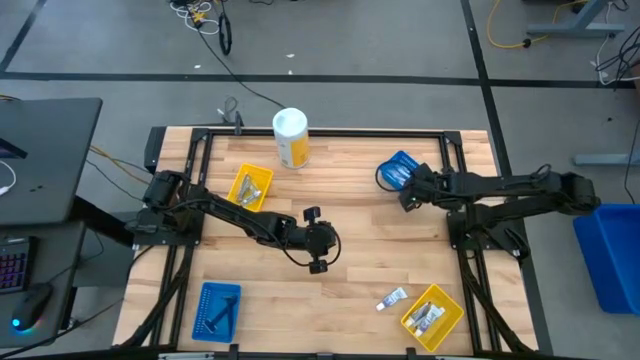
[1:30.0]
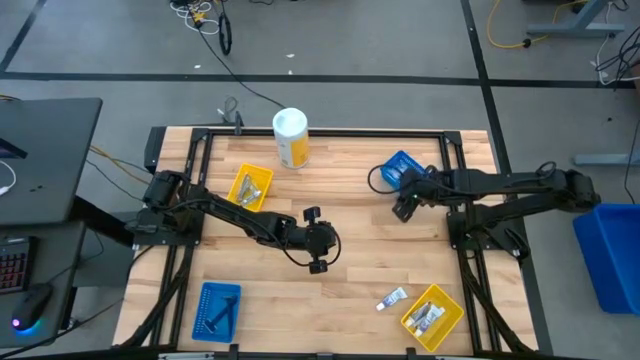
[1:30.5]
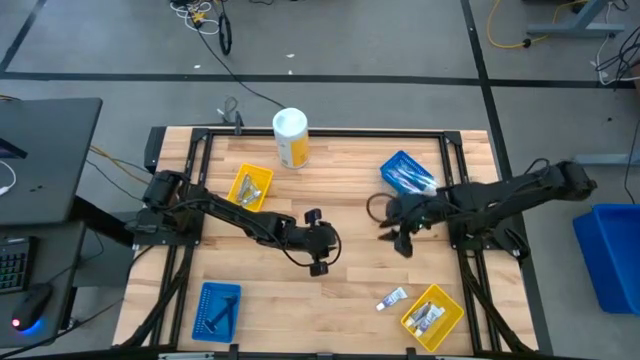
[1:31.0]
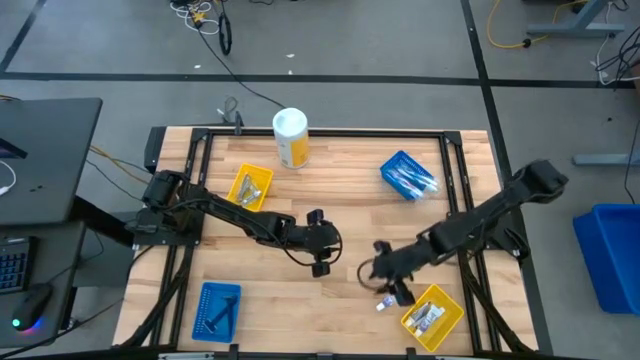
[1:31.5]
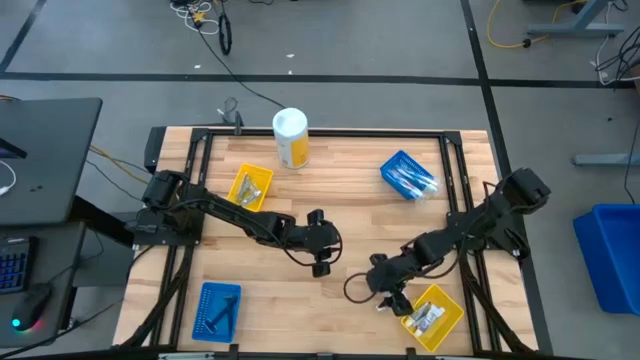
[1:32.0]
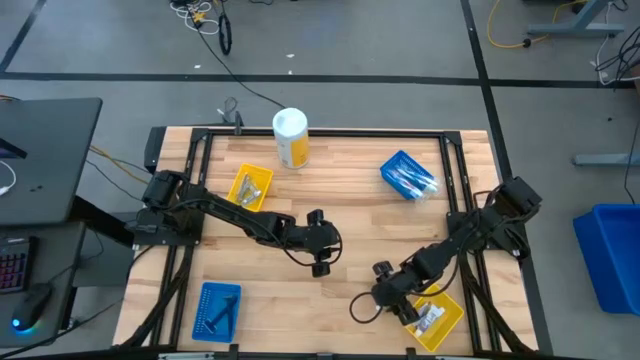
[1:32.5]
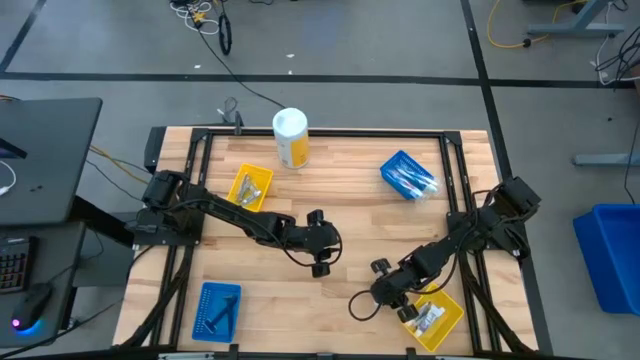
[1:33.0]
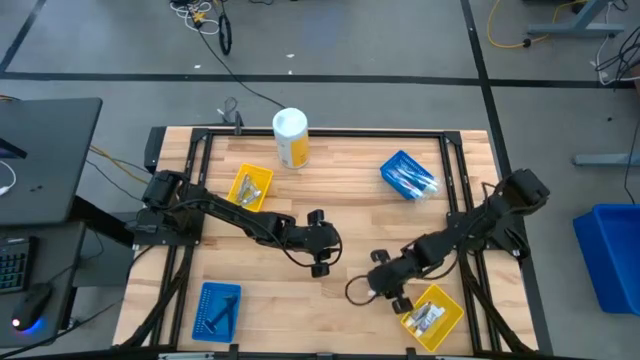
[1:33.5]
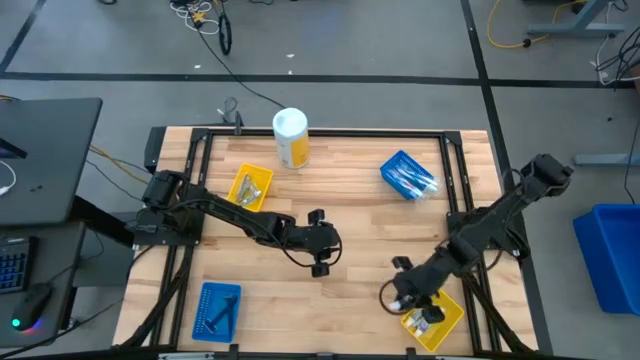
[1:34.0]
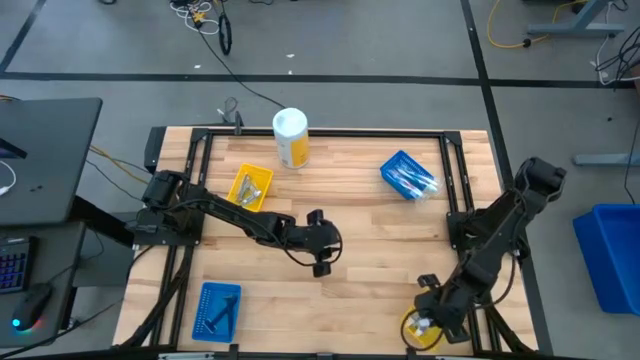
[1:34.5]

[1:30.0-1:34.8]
Task: Pick & Place Travel size toiletries
Put the white toothpaste into the bottom yellow bin

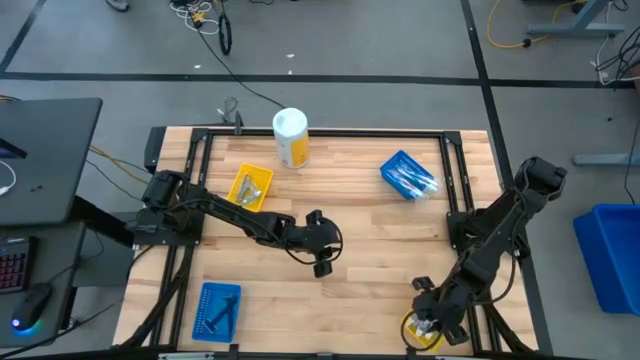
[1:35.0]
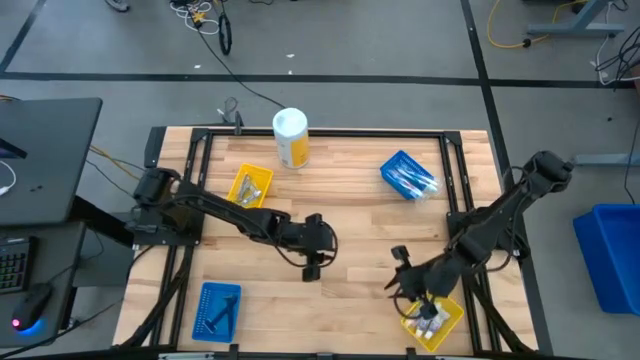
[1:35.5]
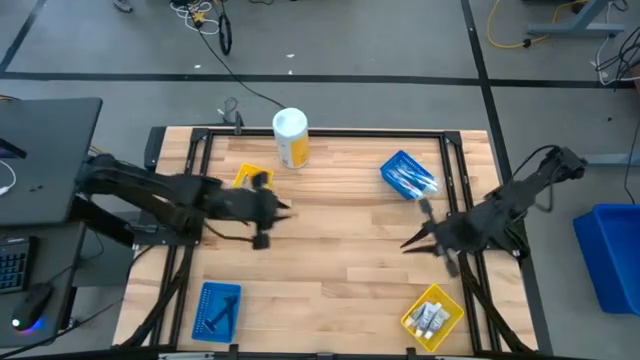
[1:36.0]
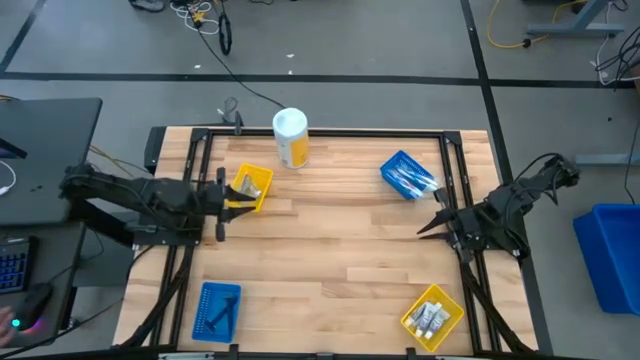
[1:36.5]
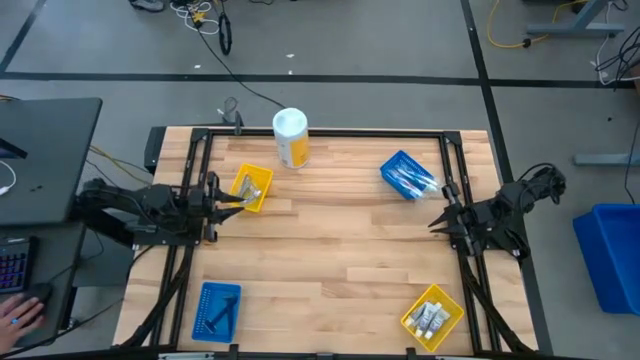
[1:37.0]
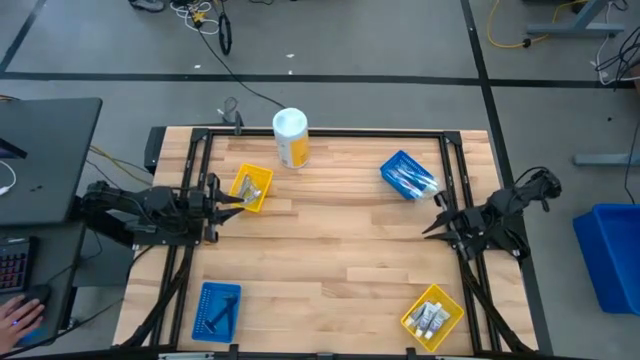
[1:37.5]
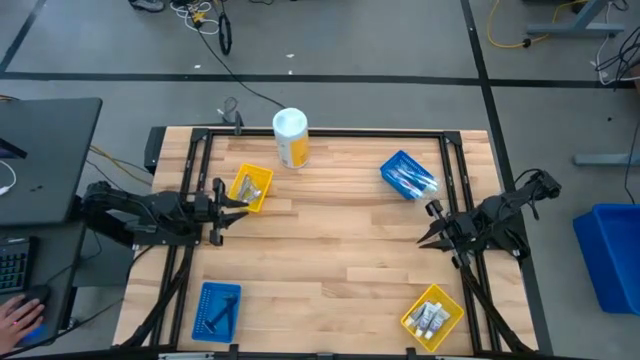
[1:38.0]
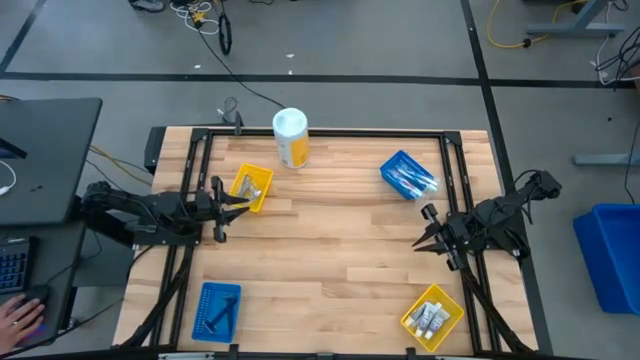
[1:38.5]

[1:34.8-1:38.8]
Return to Home Position

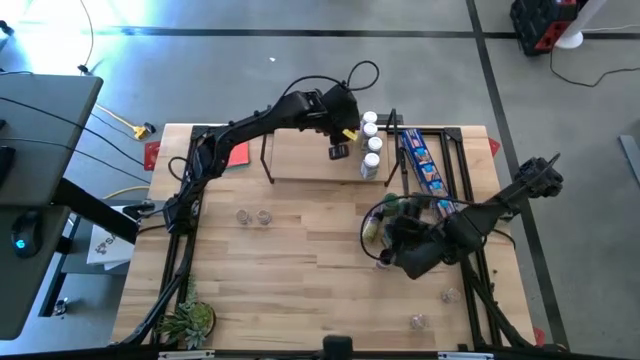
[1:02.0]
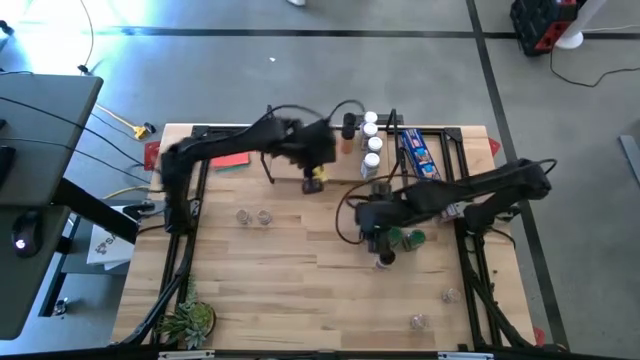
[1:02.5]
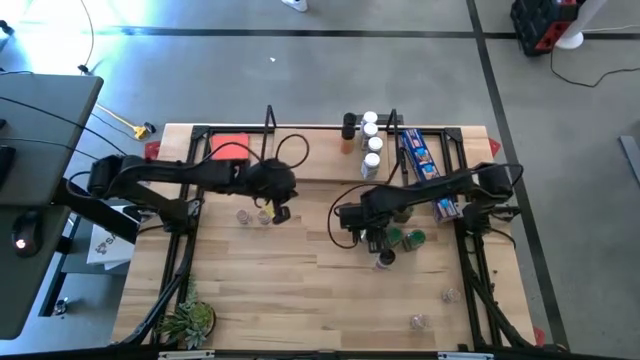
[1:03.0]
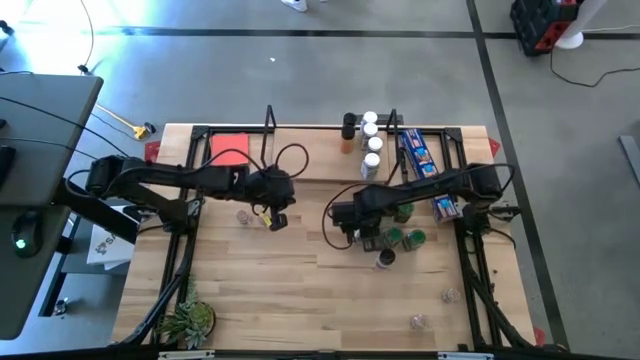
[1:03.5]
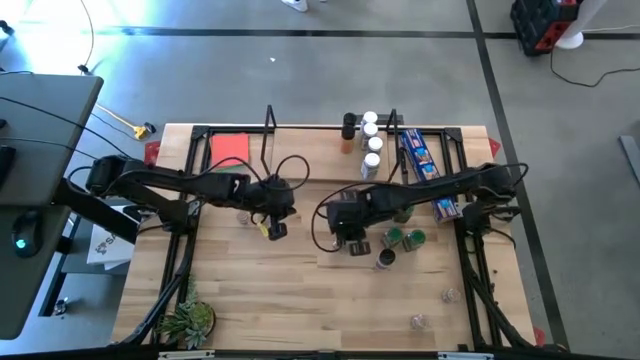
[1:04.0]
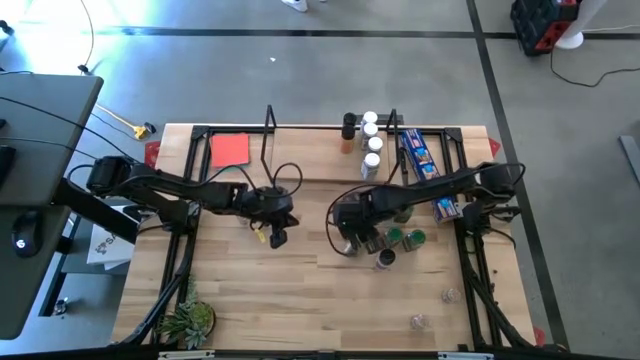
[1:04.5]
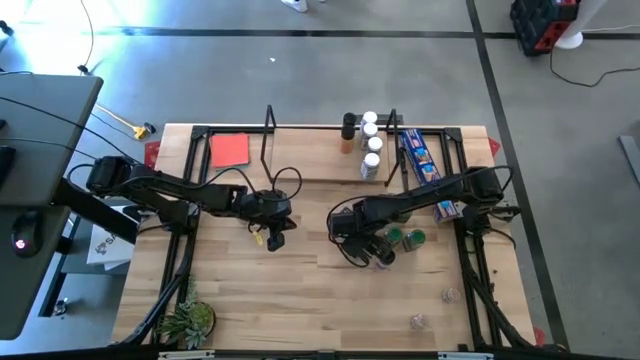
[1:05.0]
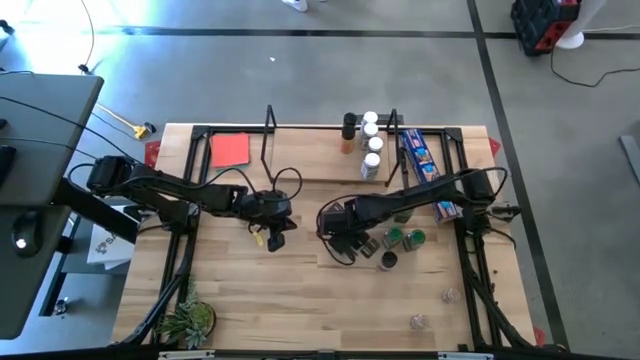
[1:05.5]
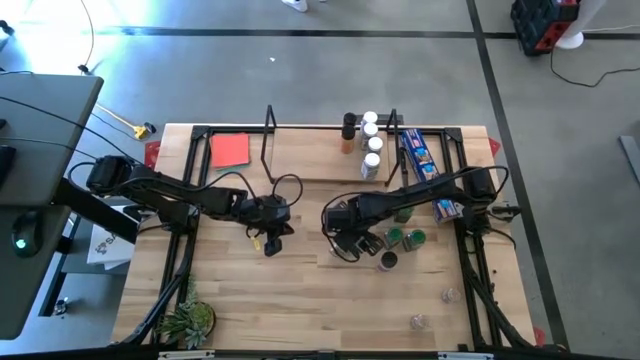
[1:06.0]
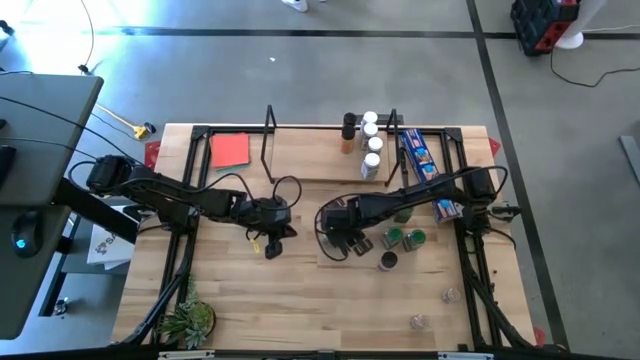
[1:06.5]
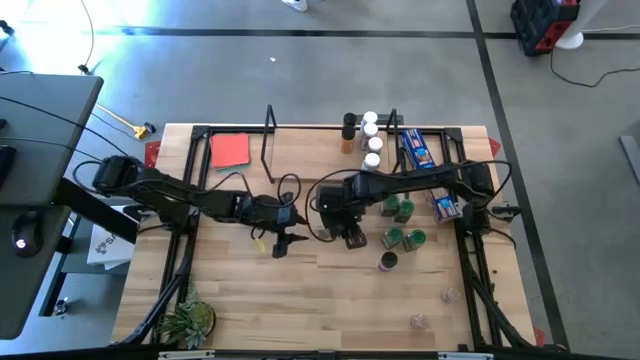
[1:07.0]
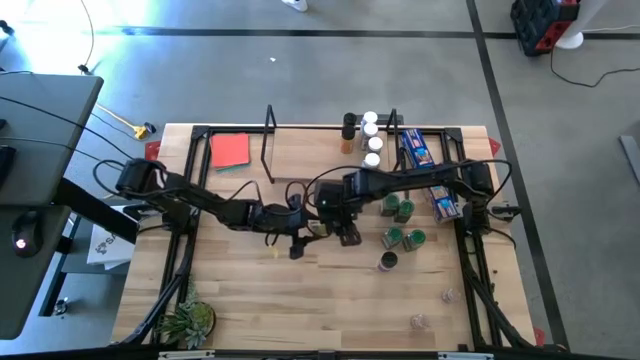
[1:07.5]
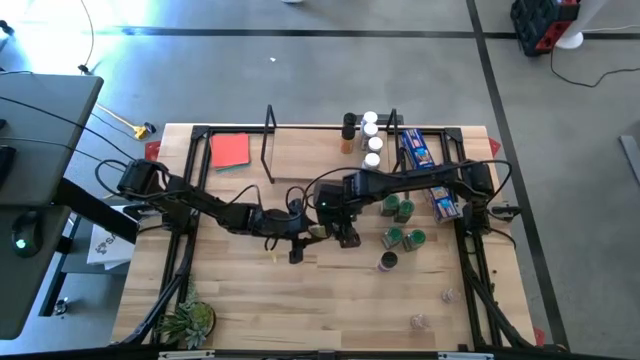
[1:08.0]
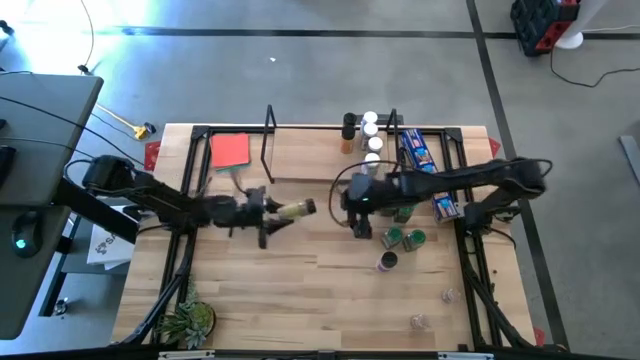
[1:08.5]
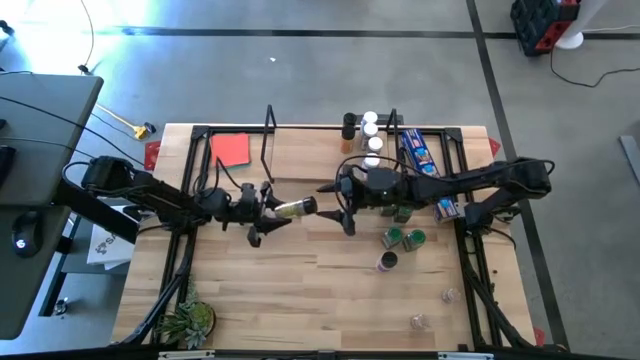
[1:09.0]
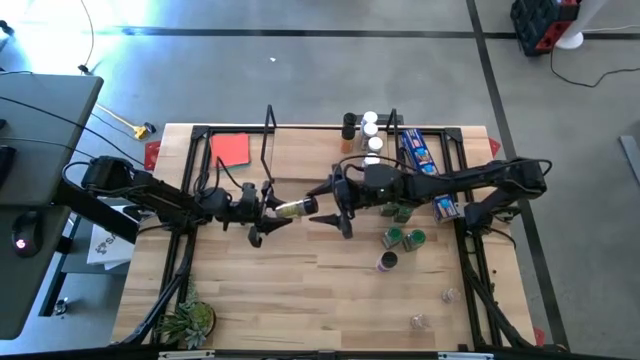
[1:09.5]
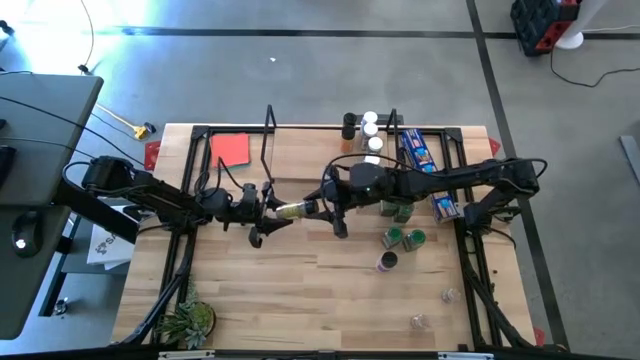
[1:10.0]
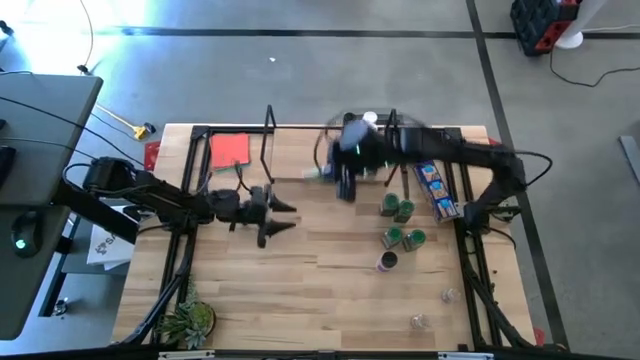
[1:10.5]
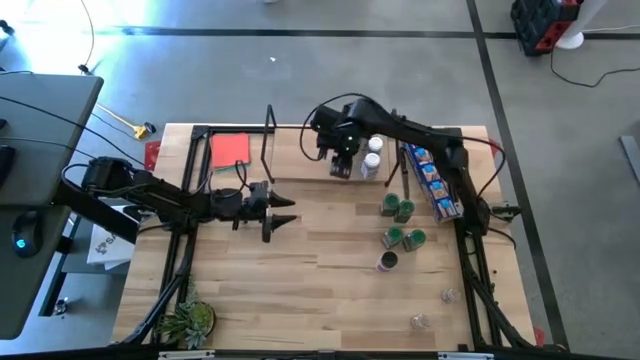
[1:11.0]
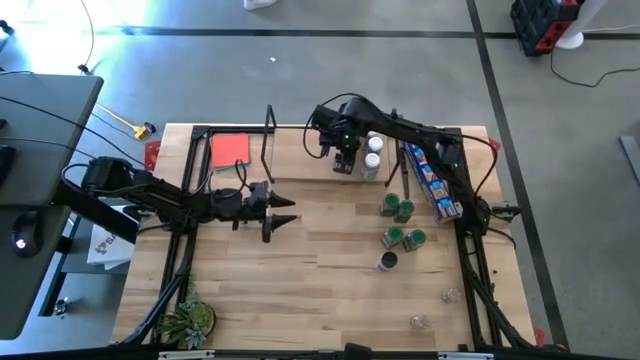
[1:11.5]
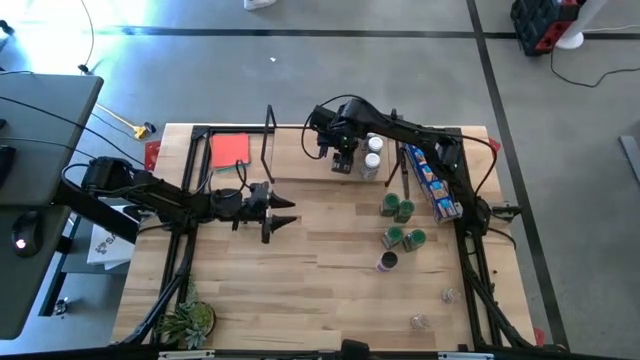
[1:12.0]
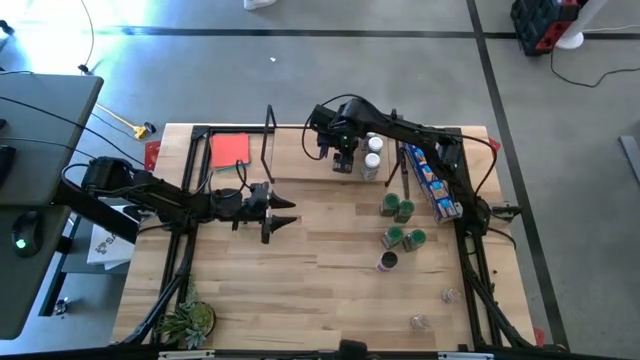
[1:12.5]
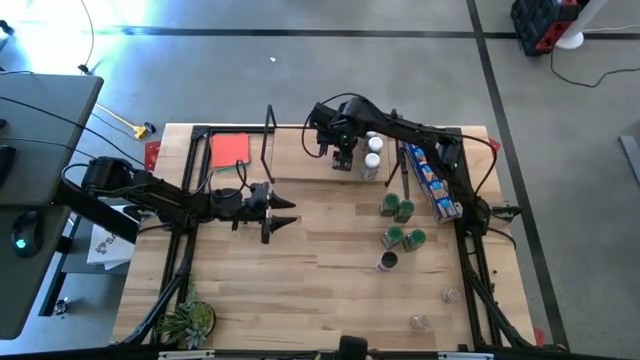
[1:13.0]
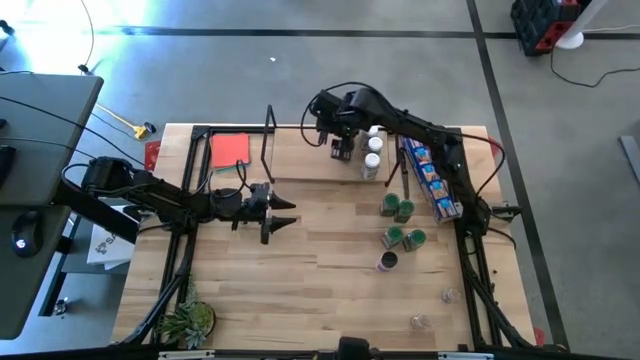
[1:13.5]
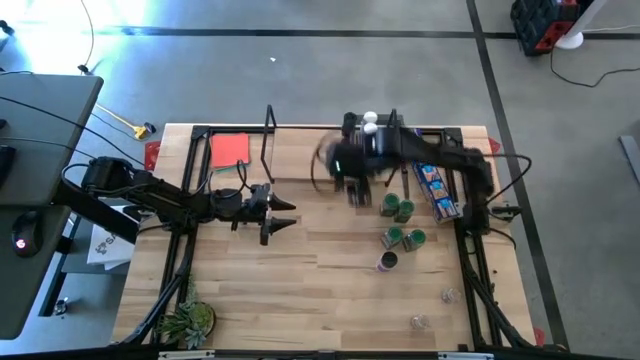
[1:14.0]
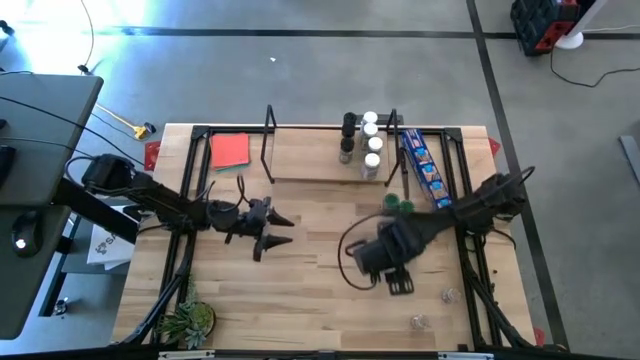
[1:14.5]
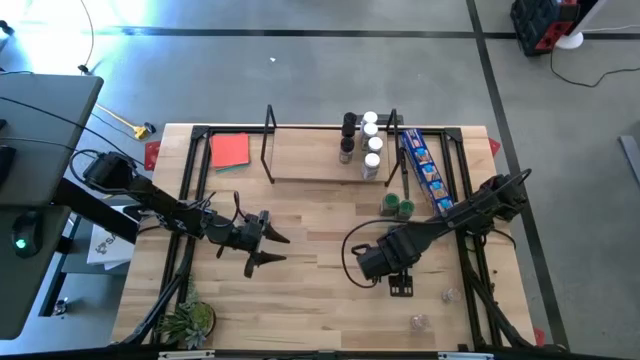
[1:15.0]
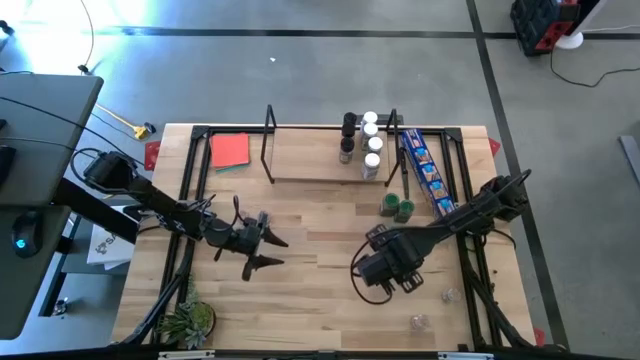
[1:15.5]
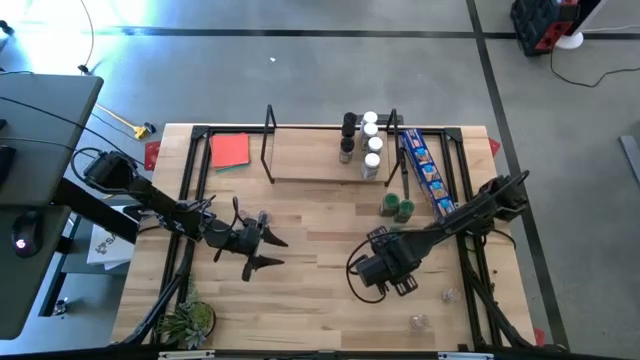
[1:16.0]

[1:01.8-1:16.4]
Task: Shelf spices
Put the top black seasoning bottle on the shelf aligned with the other black seasoning bottles
